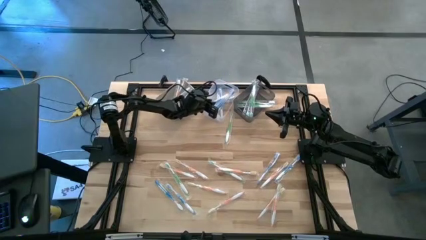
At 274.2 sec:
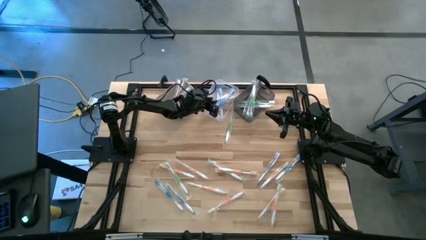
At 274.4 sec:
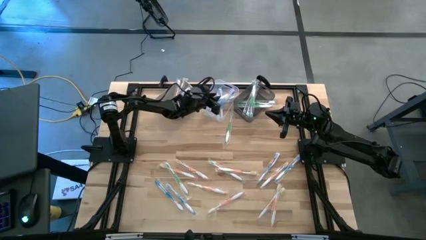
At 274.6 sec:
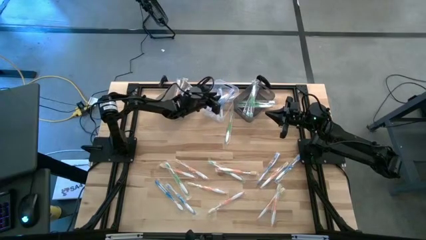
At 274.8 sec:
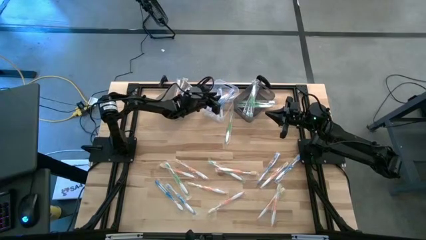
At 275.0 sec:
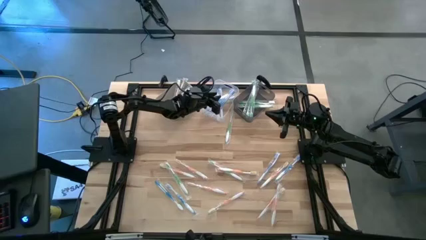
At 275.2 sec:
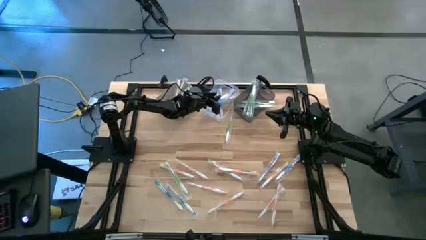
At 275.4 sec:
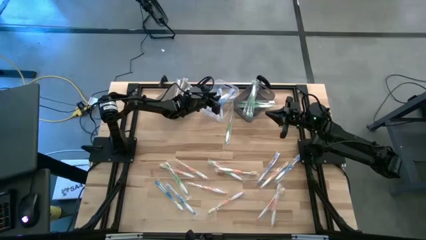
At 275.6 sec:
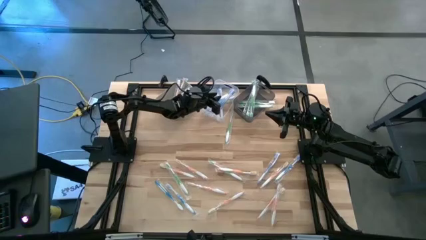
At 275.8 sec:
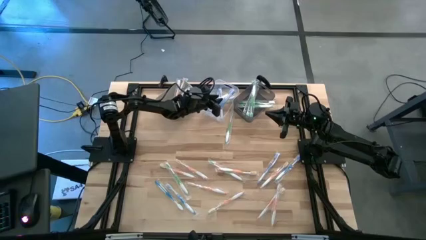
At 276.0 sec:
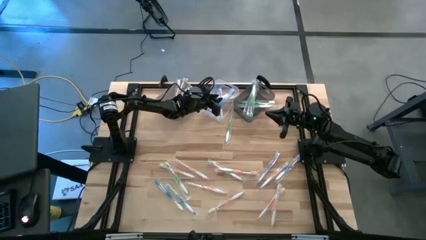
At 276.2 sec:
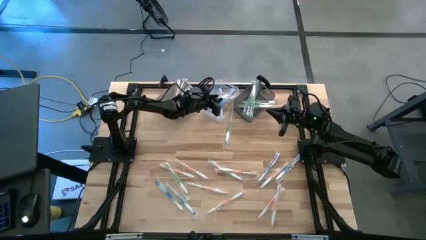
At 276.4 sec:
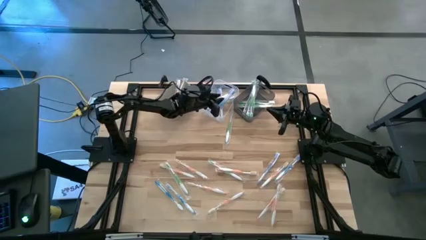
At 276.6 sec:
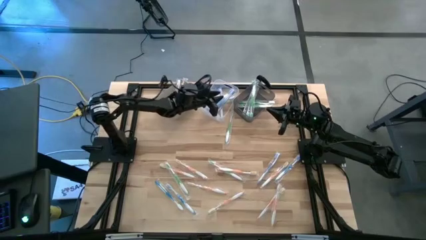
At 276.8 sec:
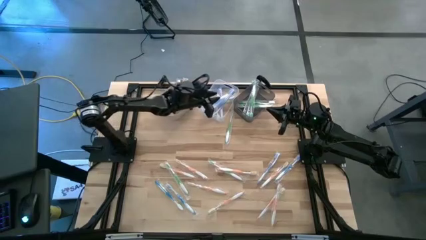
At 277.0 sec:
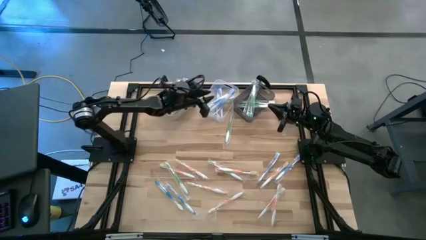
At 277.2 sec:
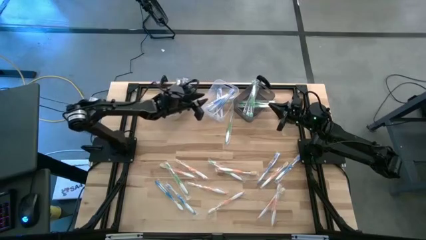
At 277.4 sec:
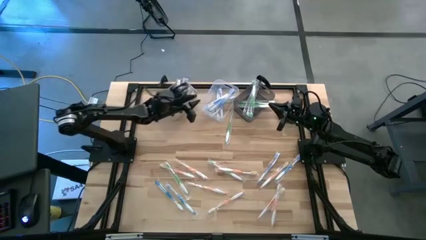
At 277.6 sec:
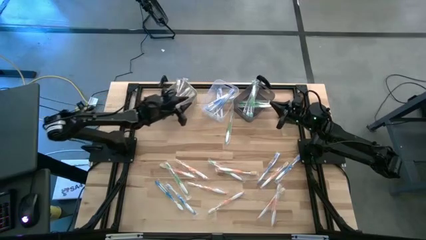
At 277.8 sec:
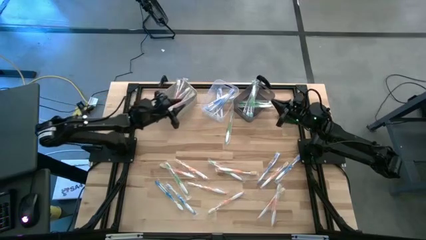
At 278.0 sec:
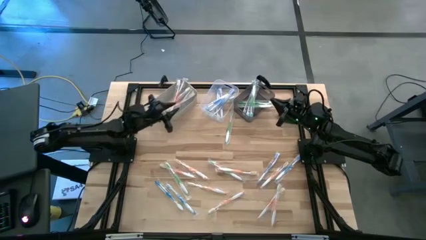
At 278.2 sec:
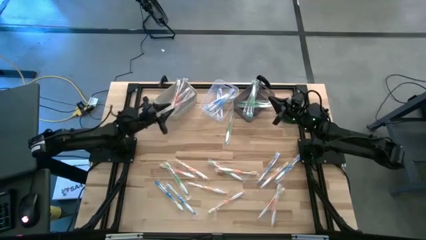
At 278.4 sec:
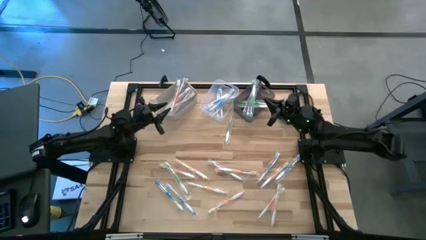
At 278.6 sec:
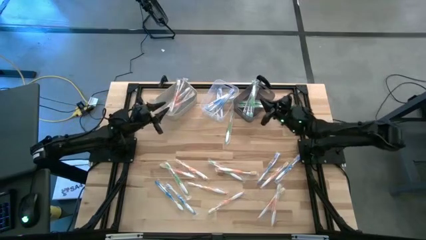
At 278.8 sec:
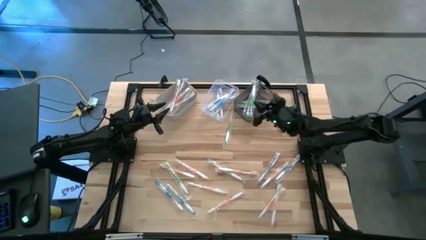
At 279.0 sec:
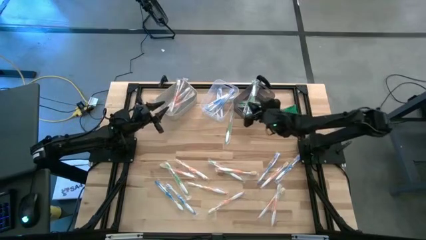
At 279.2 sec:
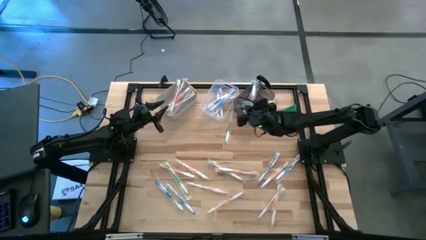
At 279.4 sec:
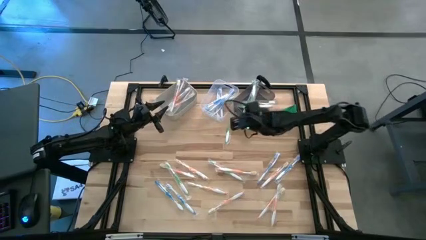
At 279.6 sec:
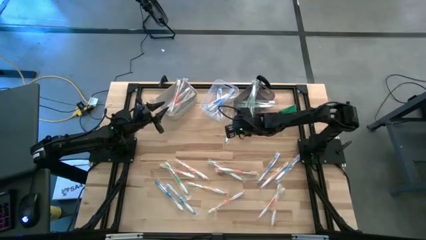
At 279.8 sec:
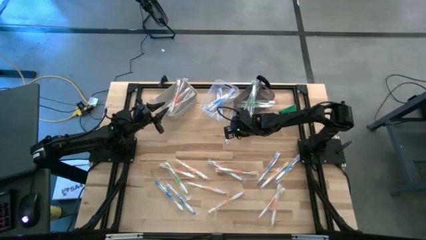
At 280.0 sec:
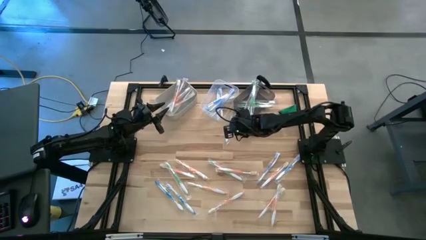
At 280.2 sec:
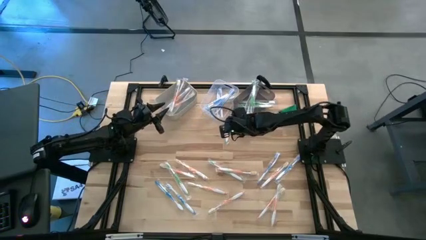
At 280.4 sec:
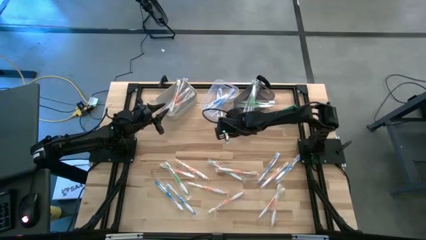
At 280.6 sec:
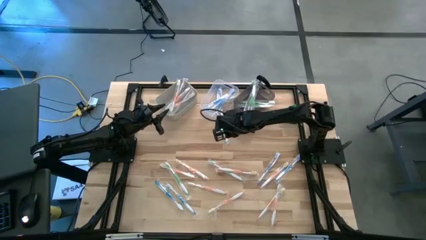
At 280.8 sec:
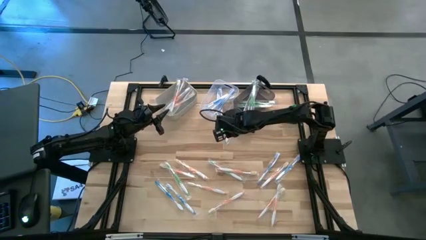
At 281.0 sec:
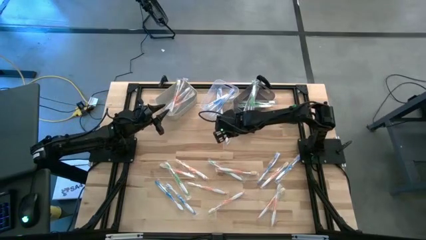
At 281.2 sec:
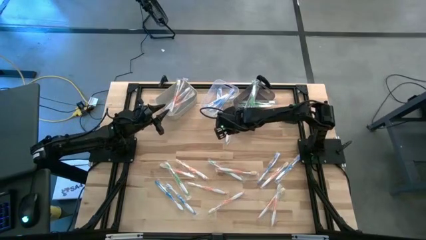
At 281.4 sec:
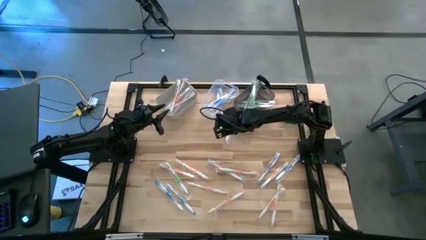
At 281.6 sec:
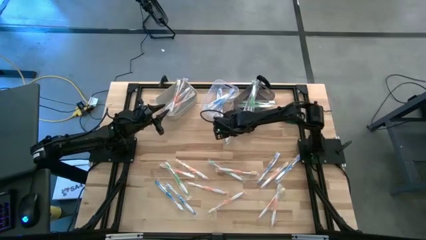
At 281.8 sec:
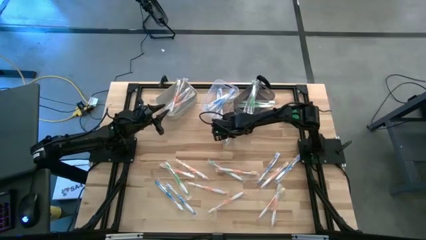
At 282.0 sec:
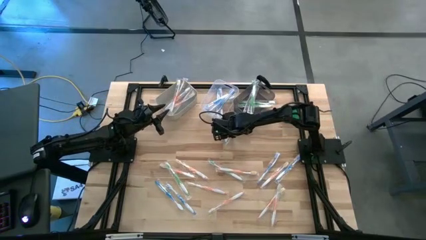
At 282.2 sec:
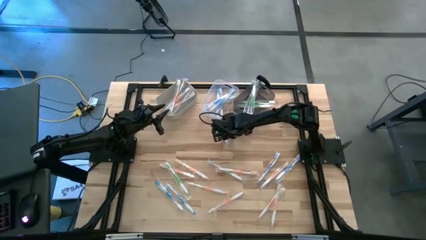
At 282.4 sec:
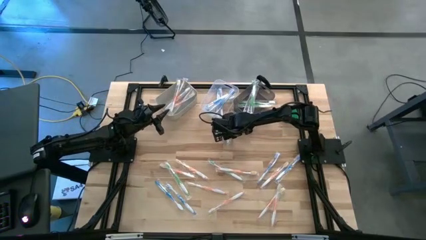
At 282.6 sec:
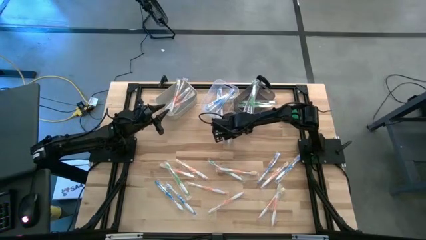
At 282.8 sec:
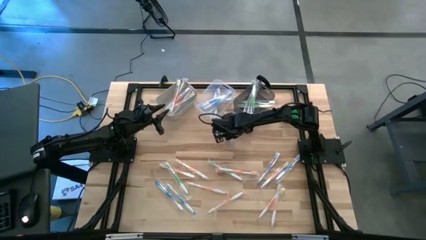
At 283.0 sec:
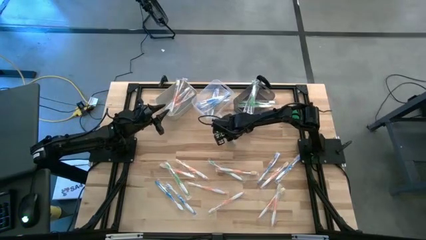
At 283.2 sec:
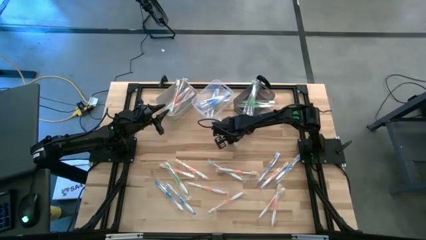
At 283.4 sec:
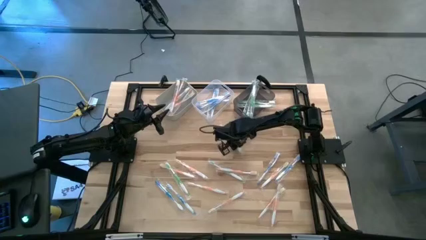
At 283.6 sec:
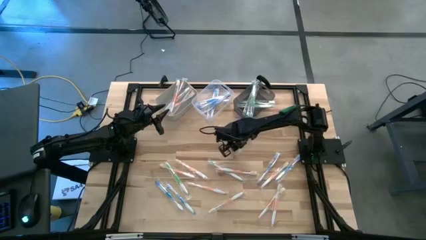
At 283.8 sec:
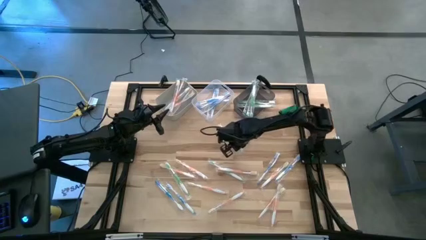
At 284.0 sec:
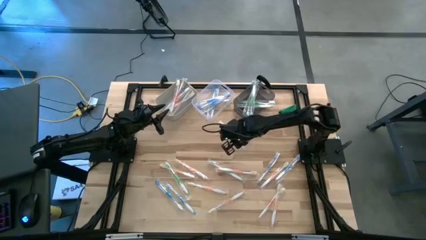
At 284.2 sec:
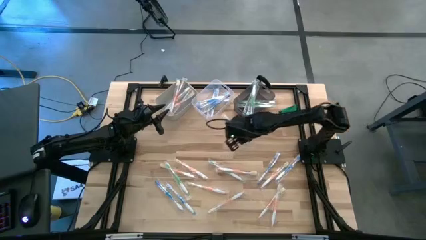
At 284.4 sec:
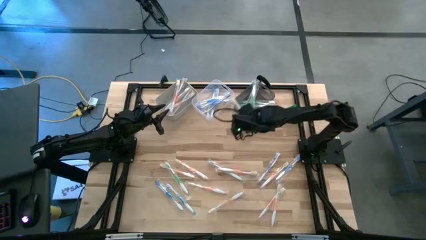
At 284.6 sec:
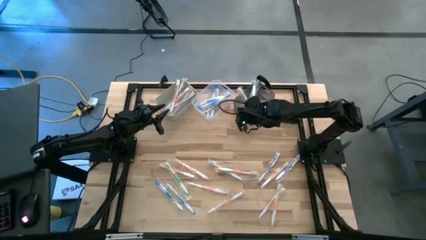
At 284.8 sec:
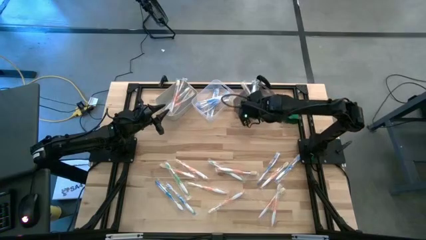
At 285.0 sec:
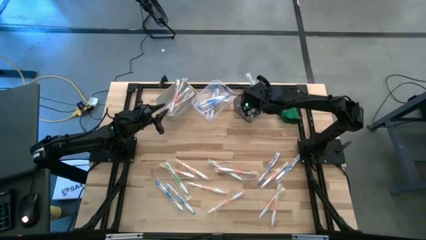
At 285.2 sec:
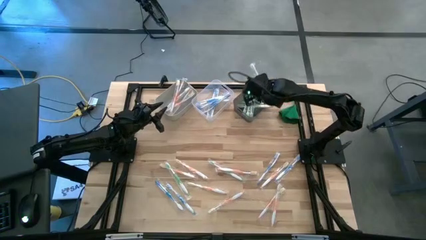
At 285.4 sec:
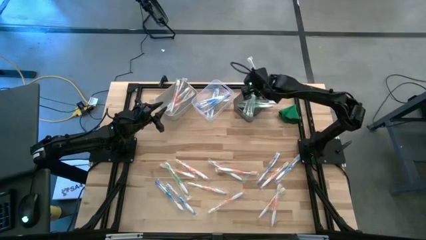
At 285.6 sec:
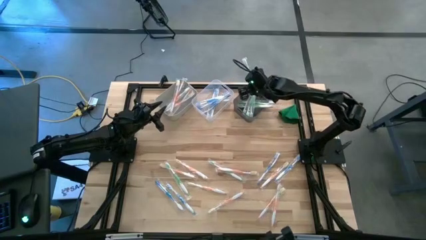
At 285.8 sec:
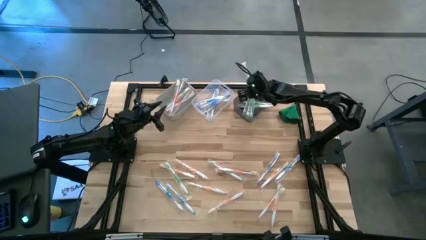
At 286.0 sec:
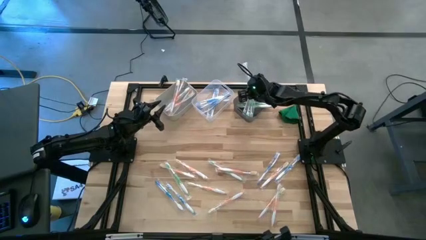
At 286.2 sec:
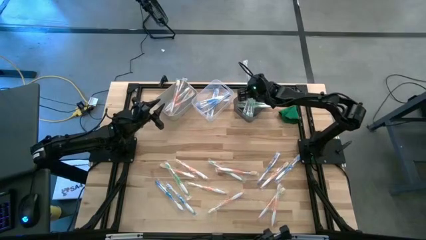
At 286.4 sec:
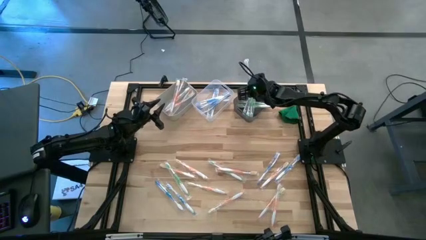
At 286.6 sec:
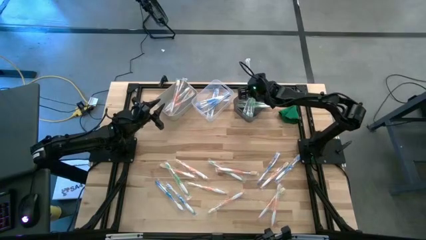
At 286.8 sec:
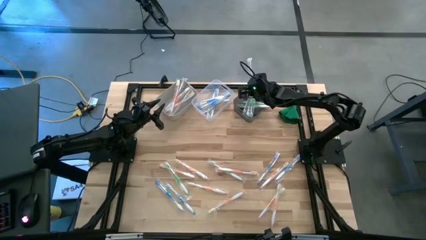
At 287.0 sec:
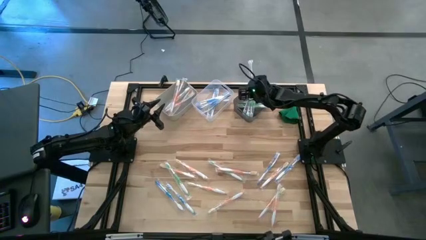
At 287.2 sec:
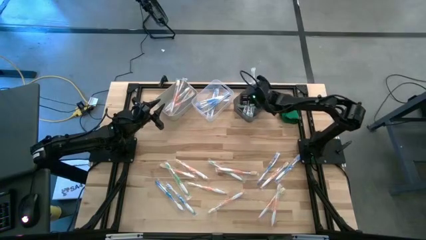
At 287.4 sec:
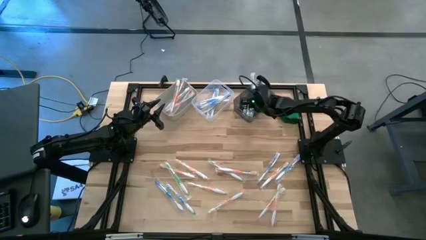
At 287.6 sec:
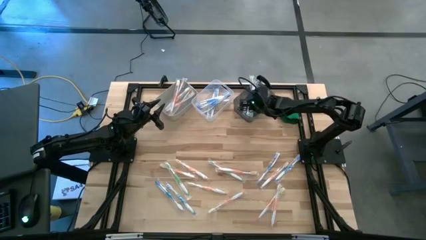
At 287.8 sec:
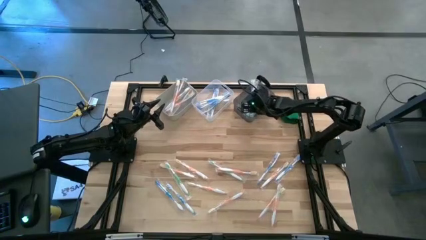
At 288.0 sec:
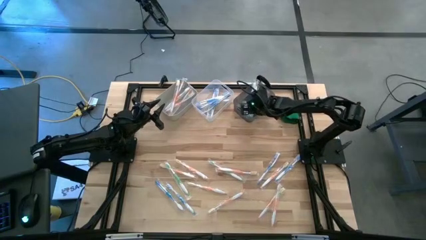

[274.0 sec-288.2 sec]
Task: Pick & Place Toothbrushes
Put the green toothbrush into the black bin

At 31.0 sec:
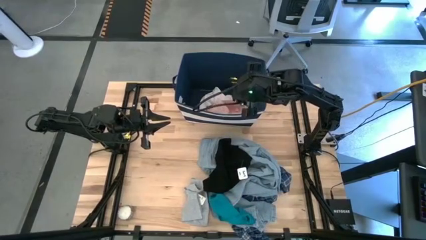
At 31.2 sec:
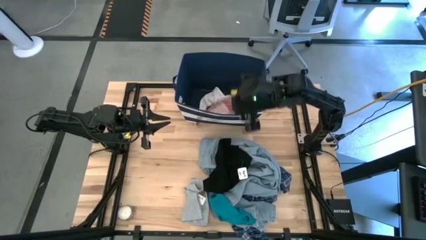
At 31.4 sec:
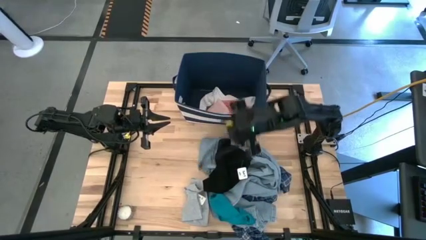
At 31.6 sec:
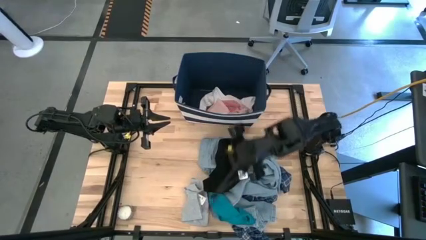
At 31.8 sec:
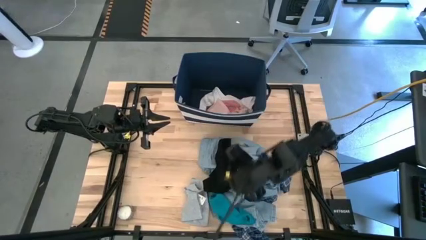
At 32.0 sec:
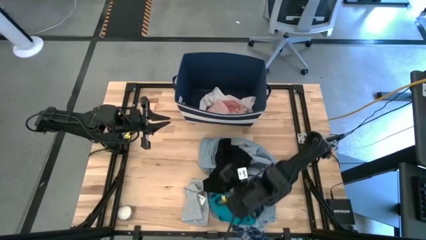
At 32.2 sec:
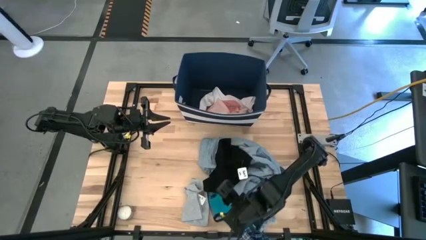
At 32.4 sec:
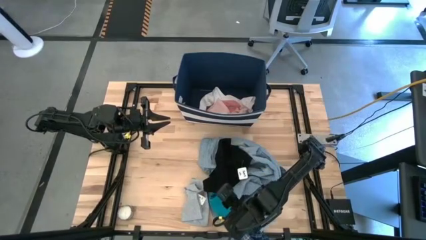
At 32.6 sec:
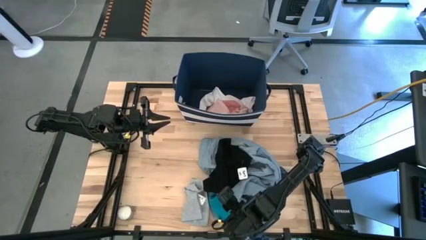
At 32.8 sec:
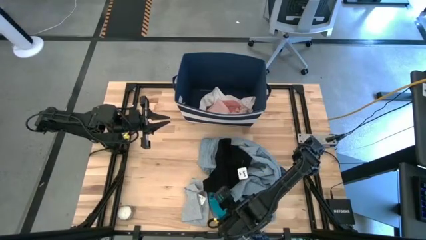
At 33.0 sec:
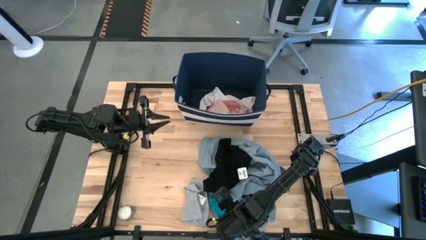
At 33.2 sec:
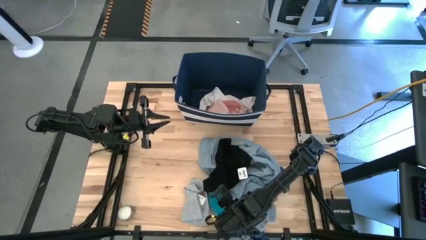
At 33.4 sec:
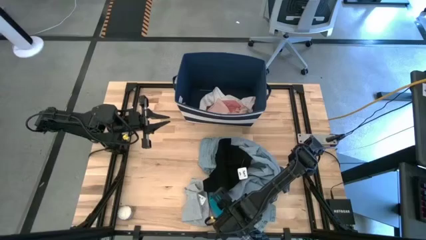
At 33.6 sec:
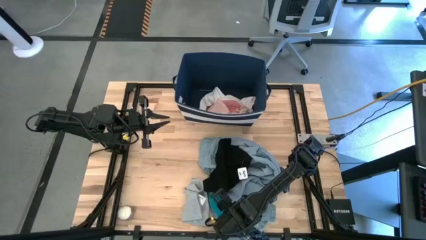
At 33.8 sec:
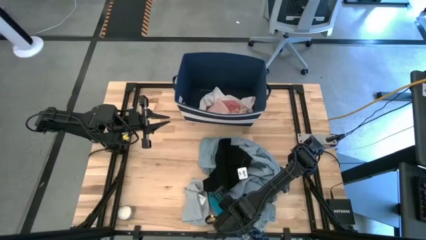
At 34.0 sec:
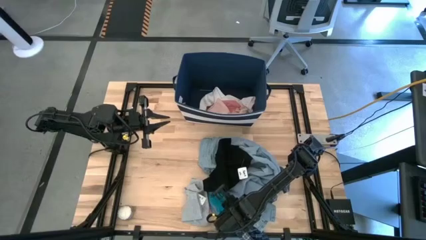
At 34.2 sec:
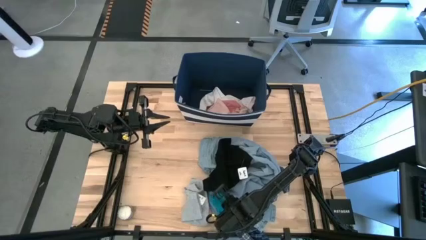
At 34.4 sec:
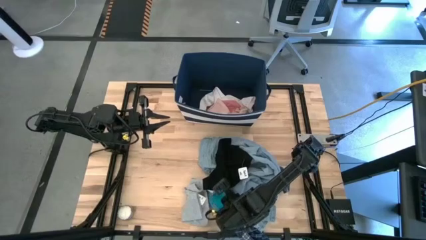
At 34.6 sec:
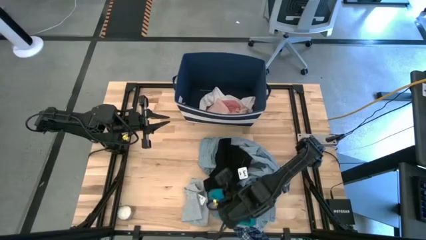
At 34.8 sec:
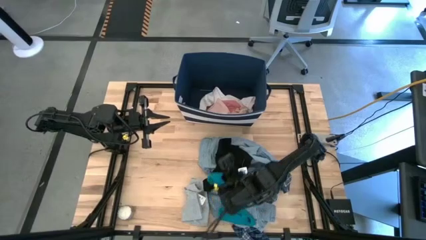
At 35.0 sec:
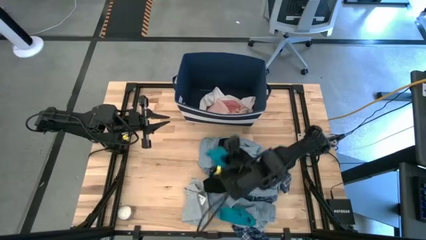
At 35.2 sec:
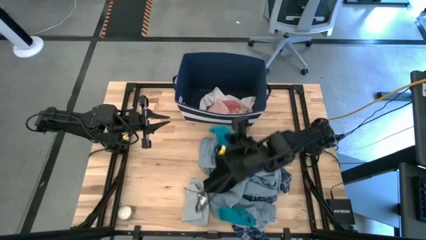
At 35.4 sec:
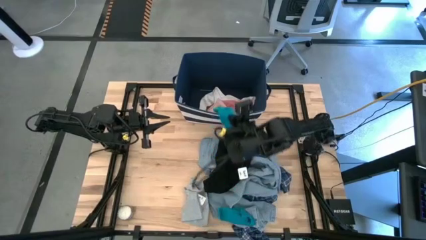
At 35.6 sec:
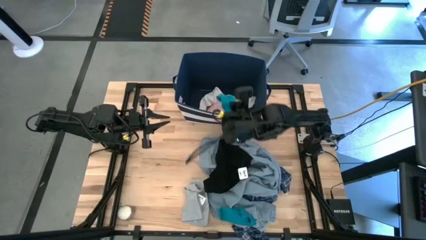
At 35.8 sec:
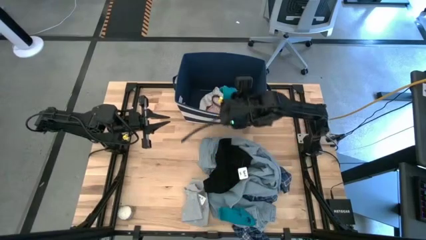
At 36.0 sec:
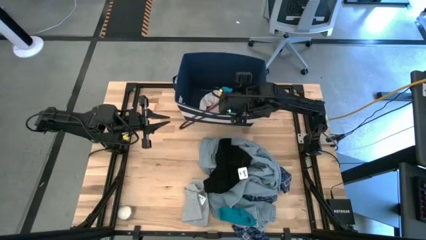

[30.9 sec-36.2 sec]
Task: Sort clothes
Put the top blue sock into the blue bin
